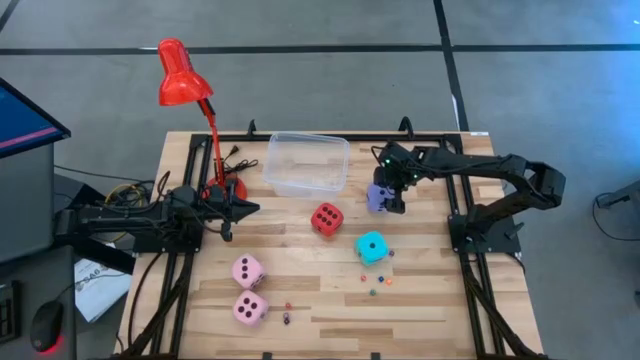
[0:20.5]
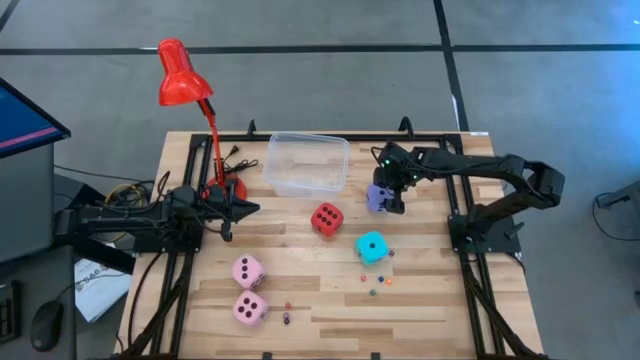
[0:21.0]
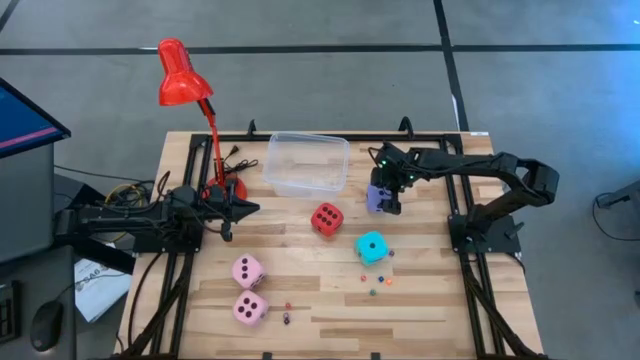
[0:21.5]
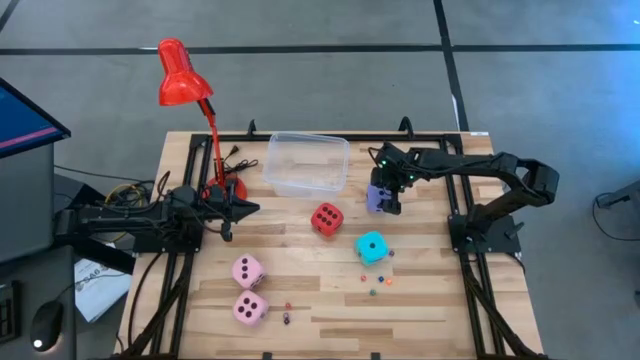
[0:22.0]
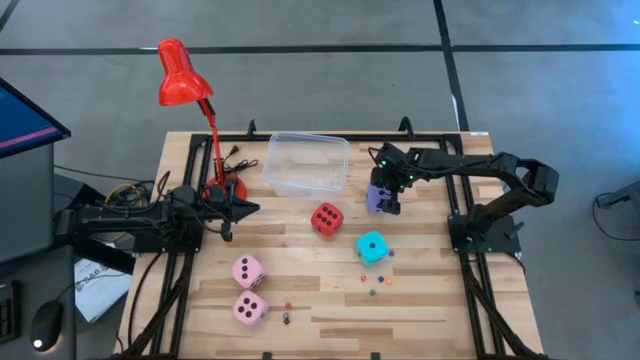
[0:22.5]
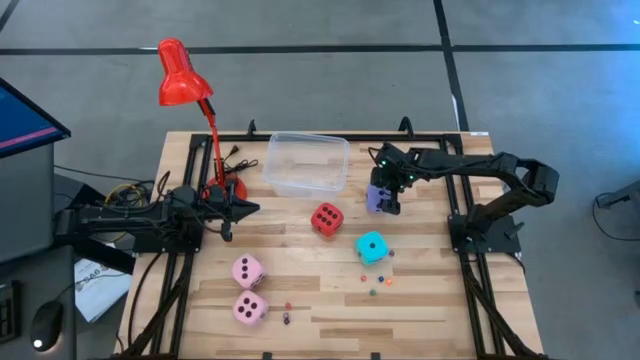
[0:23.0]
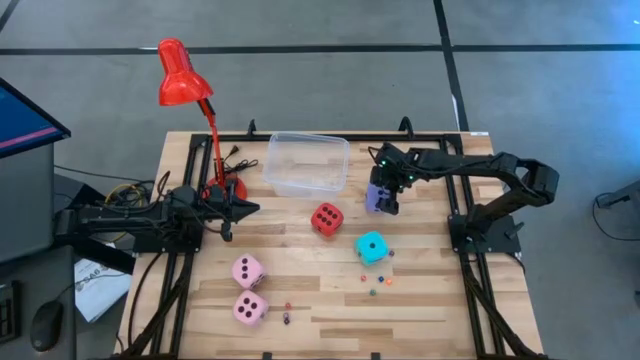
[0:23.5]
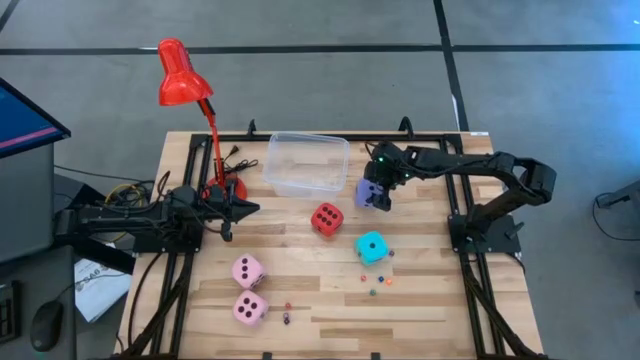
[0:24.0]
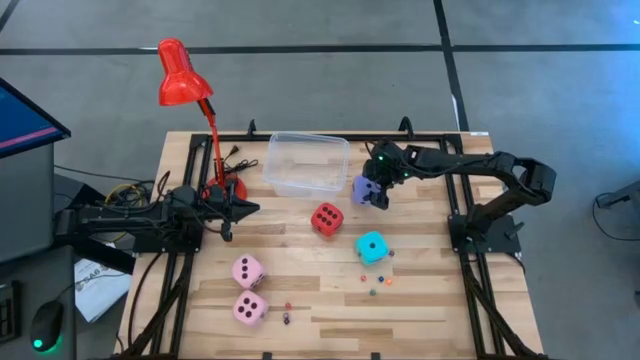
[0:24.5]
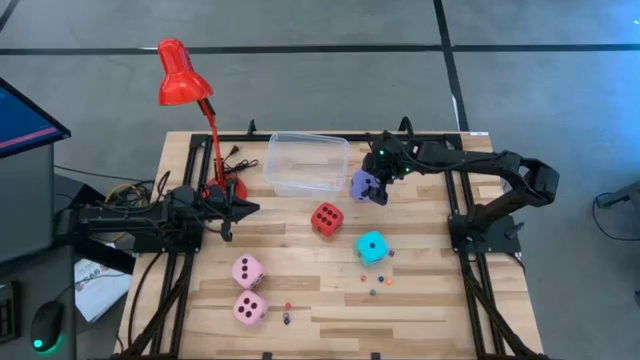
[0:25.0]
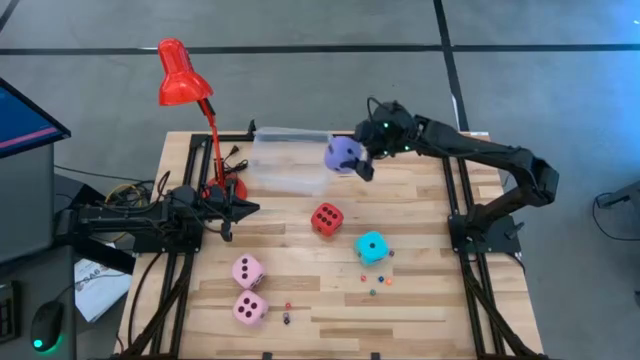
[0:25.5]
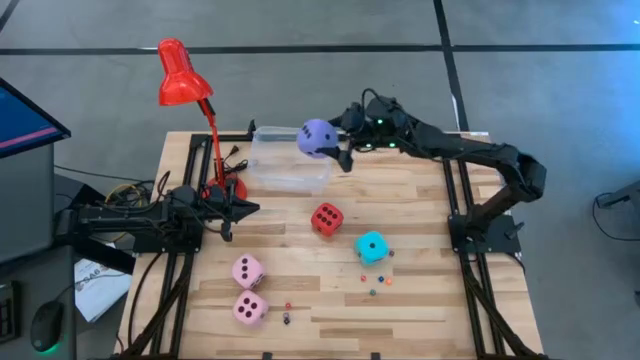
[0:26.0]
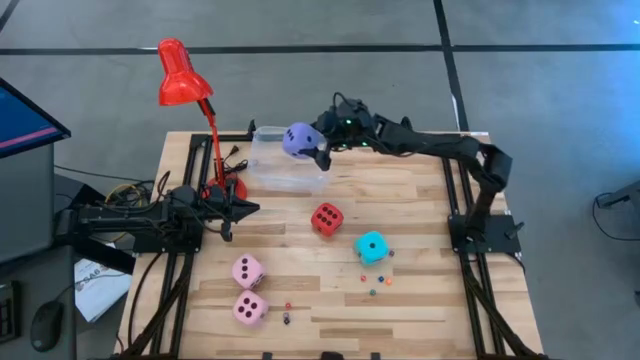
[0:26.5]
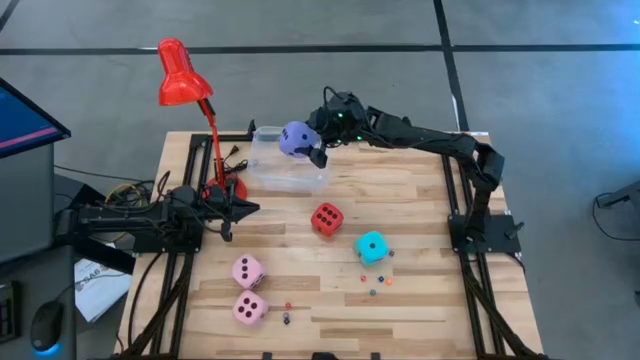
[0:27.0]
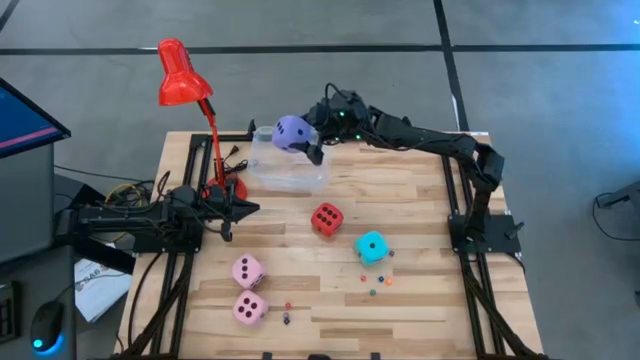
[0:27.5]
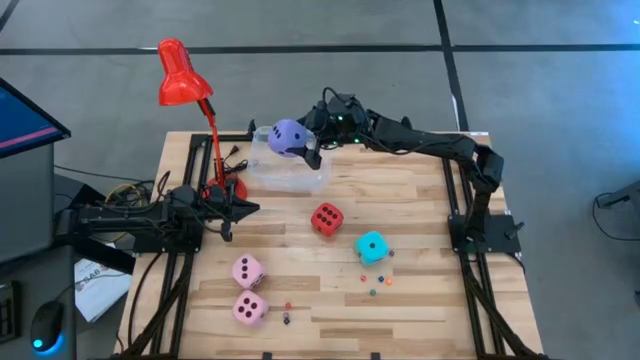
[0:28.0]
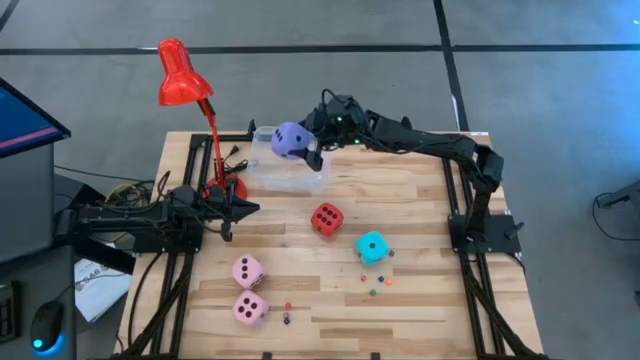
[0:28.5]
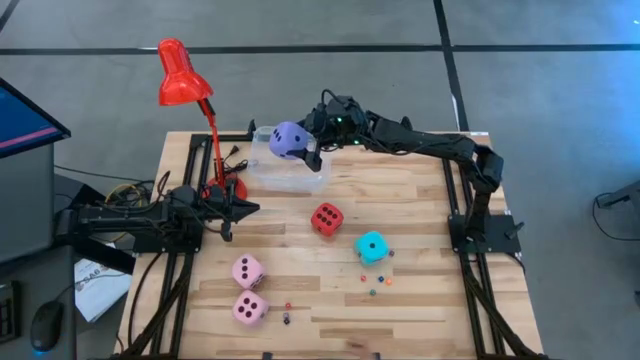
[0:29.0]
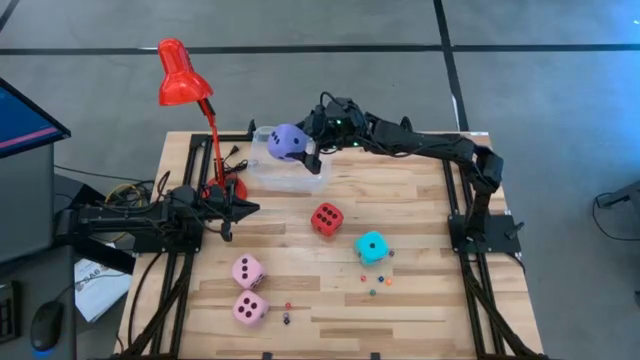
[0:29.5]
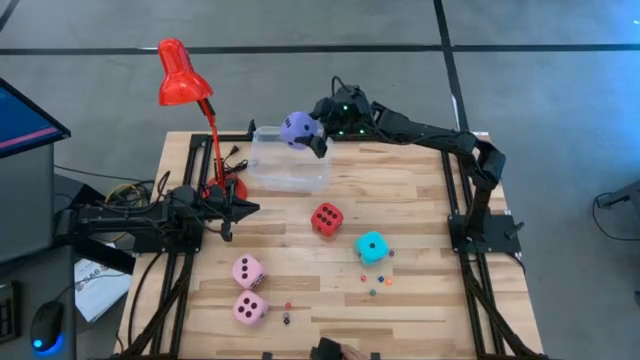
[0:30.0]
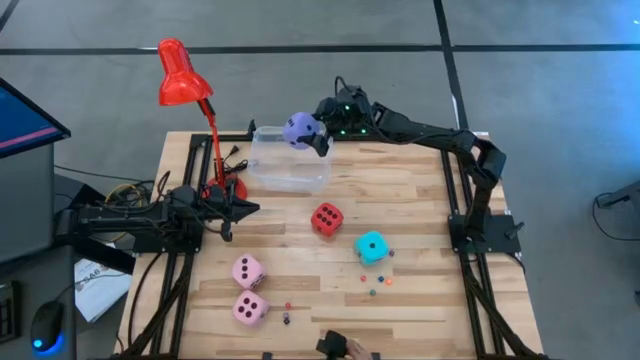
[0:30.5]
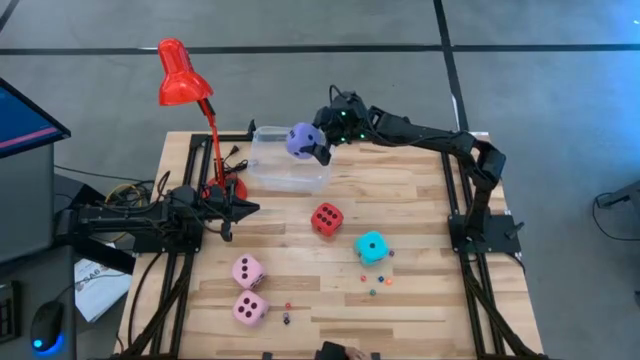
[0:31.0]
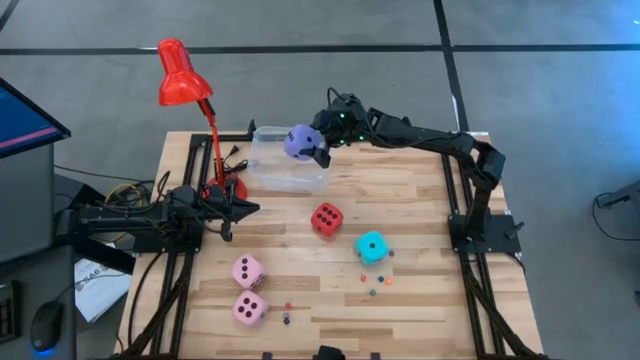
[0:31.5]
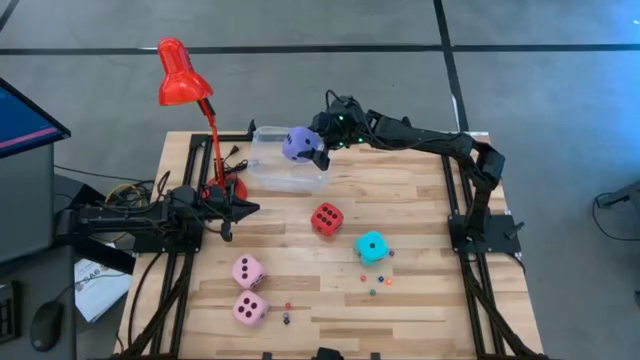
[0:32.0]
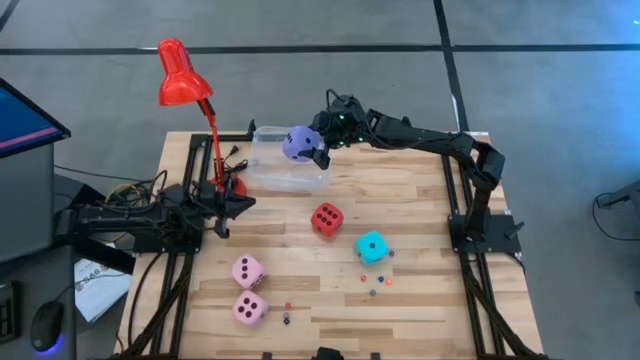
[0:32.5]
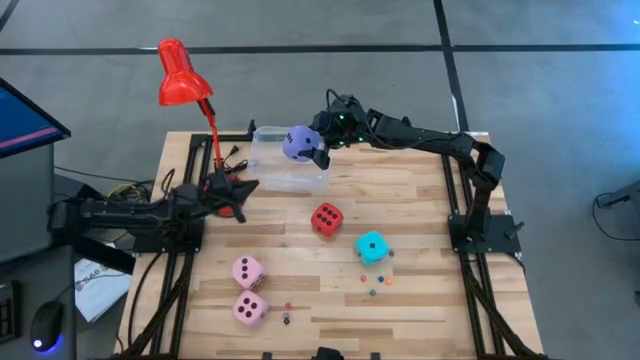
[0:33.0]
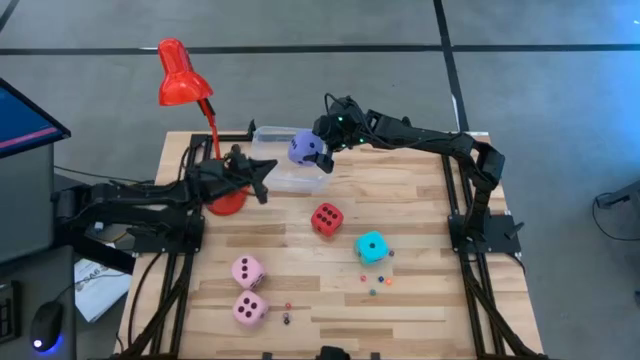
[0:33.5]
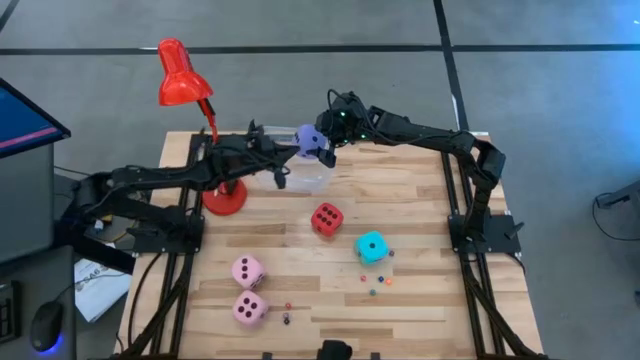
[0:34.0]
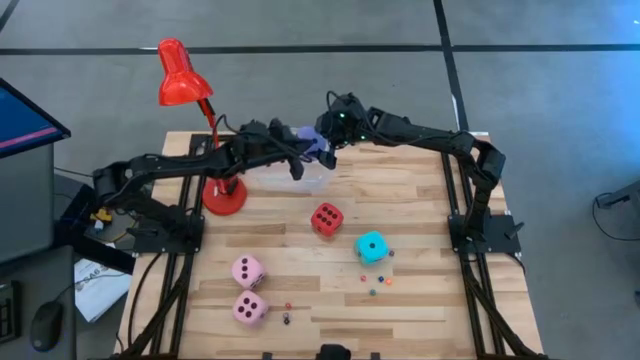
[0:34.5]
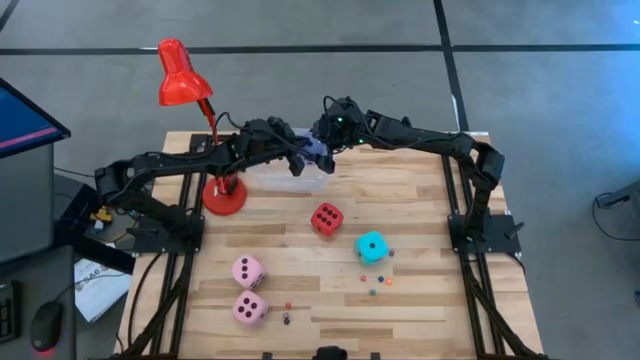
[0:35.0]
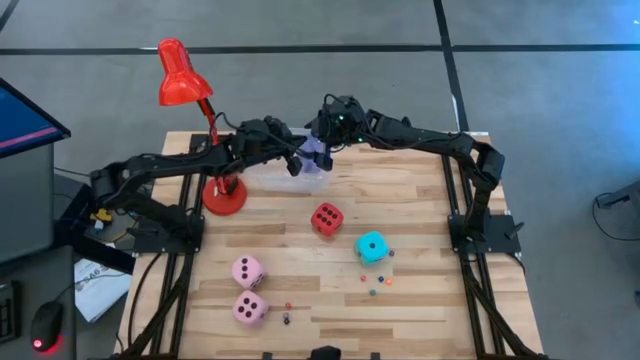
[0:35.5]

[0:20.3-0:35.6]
Task: Pick & Place Dice
Put the large purple die into the transparent bin

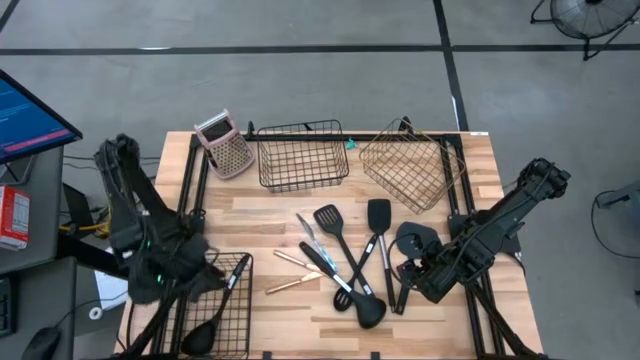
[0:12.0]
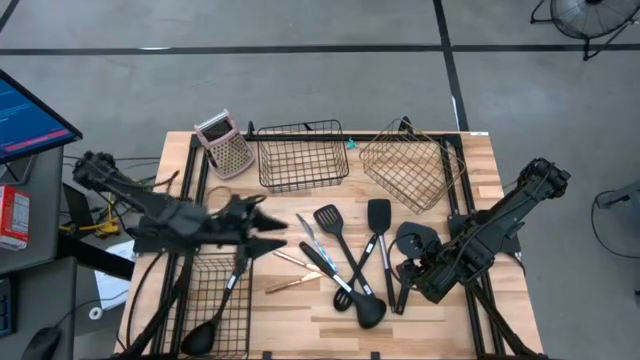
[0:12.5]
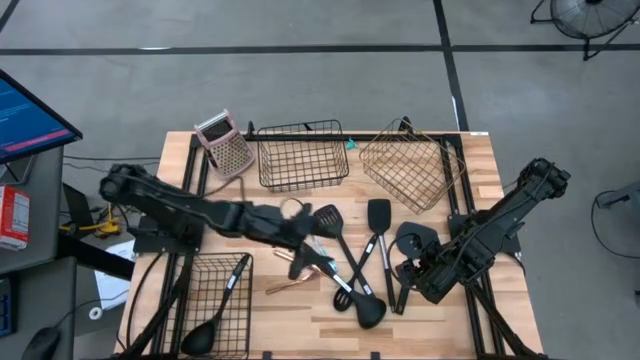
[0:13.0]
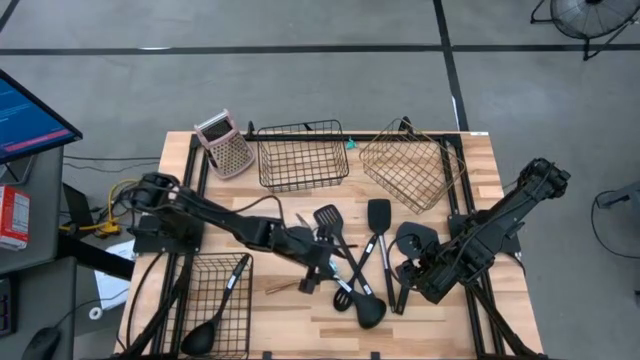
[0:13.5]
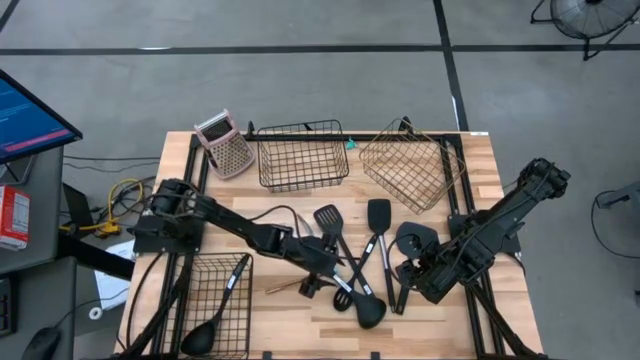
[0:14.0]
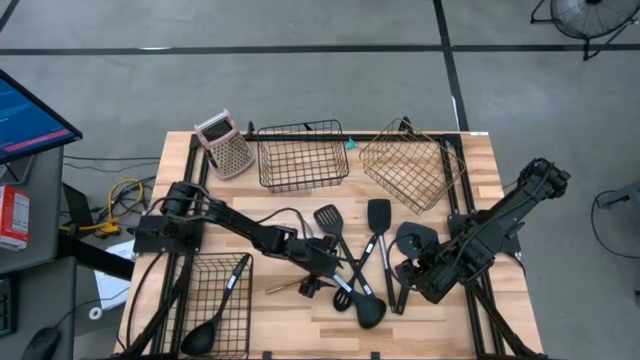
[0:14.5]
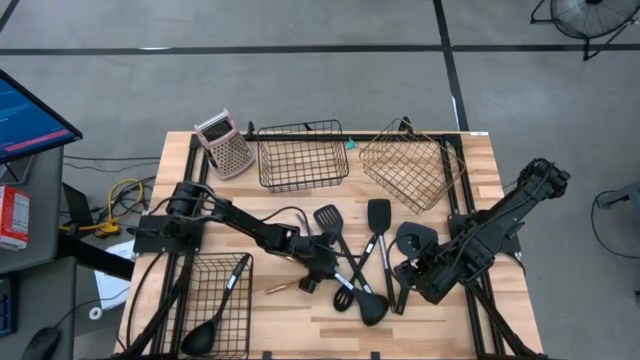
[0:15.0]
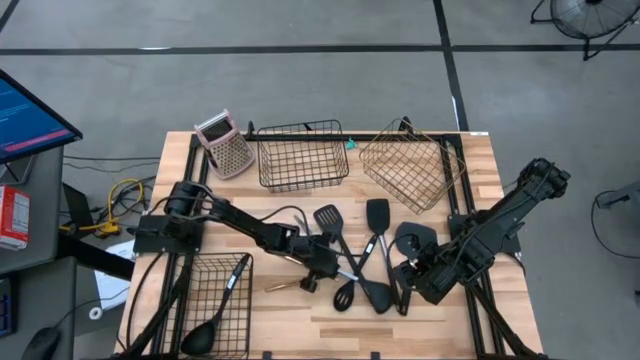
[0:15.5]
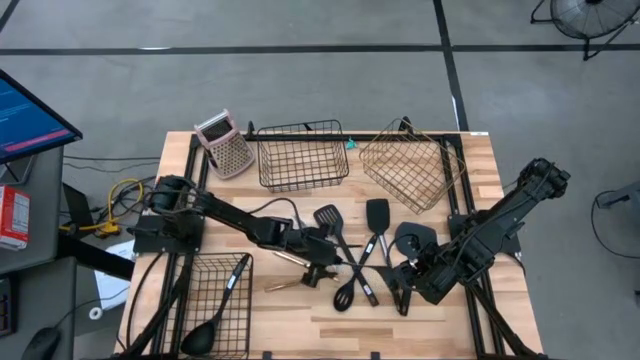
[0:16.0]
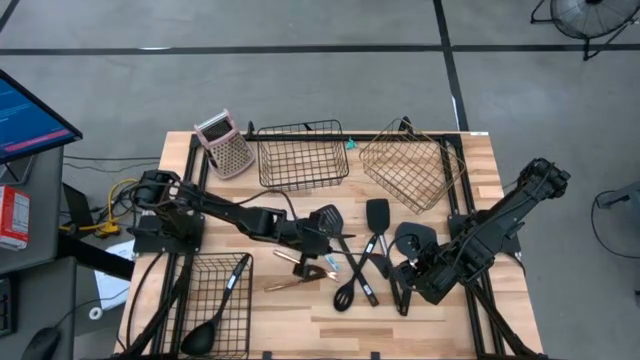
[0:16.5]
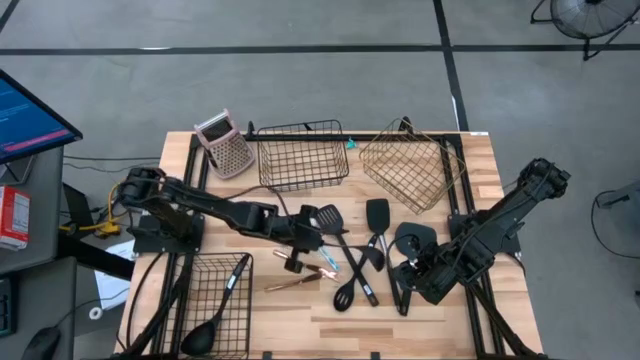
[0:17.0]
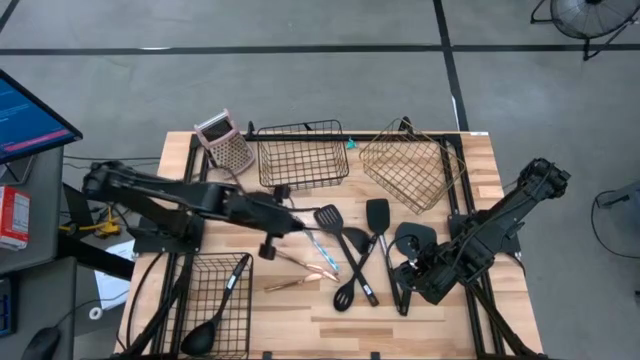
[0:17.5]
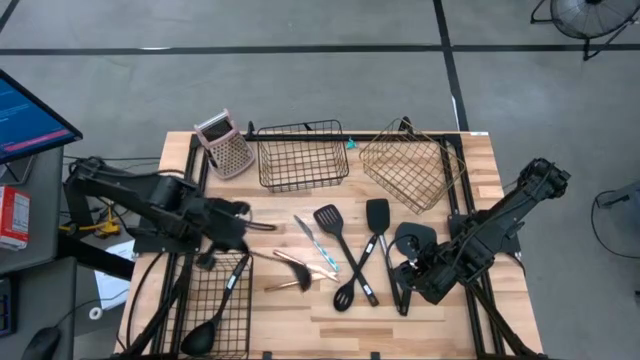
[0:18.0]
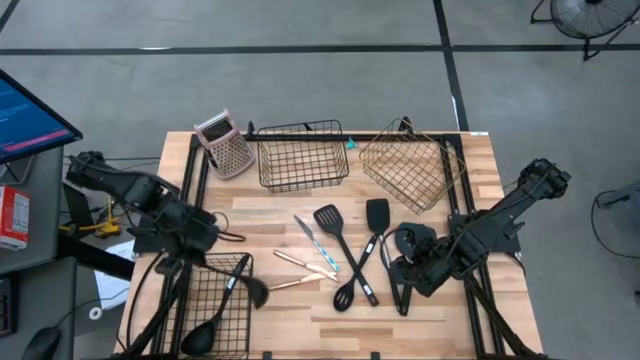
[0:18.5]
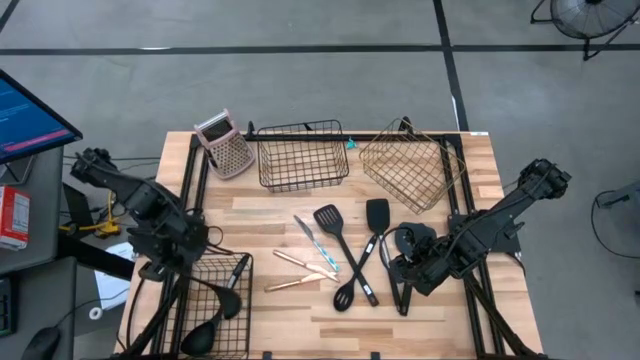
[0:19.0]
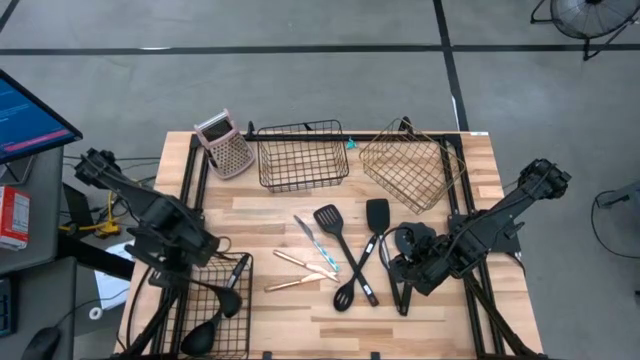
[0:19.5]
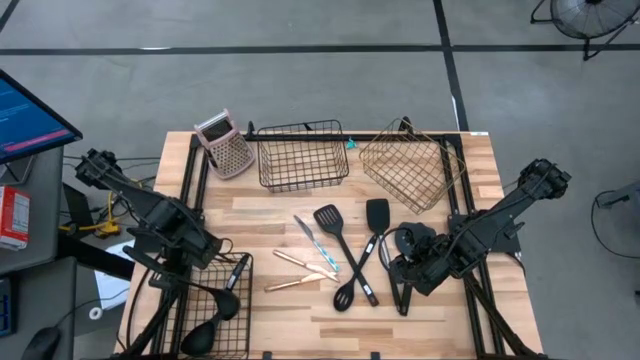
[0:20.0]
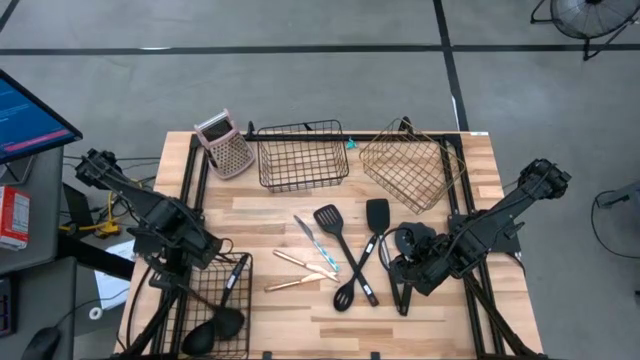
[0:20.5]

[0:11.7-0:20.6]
Task: Pick & Place Kitchen Items
Put the black serving spoon into the bottom black wire basket
